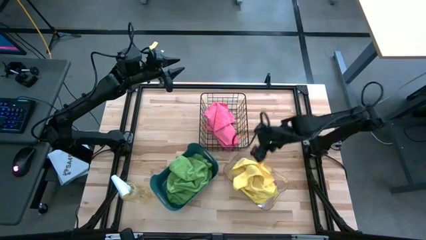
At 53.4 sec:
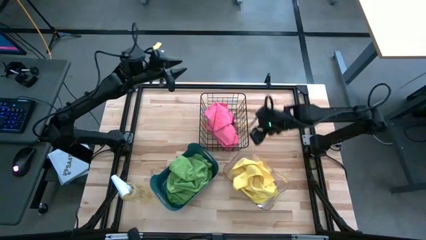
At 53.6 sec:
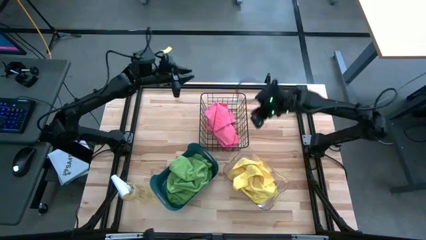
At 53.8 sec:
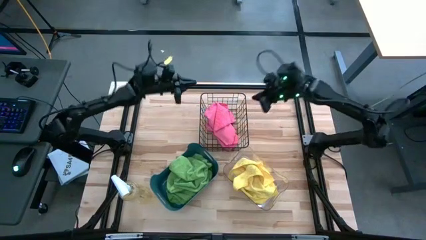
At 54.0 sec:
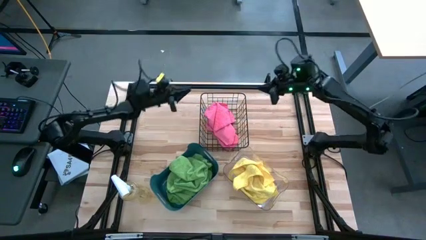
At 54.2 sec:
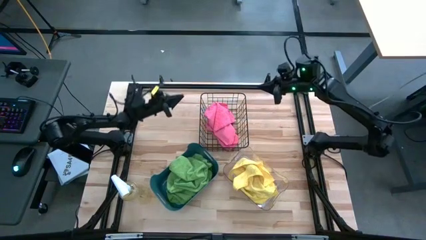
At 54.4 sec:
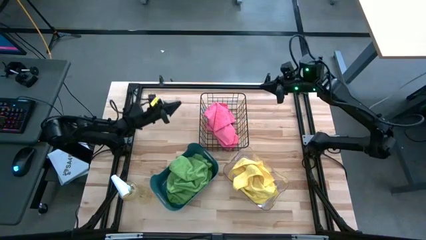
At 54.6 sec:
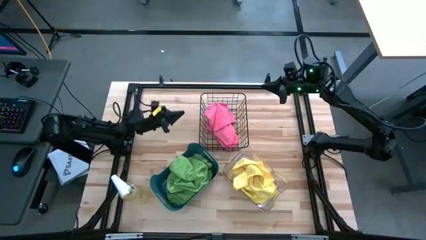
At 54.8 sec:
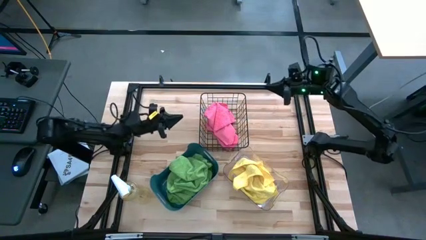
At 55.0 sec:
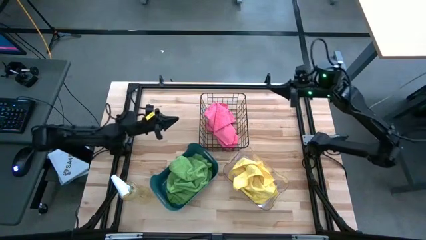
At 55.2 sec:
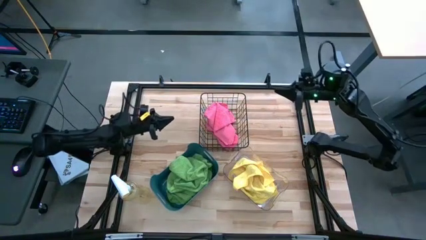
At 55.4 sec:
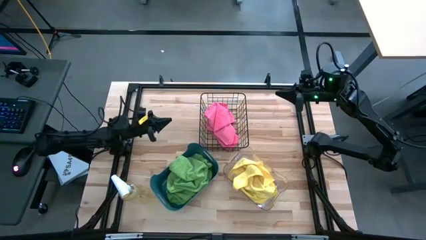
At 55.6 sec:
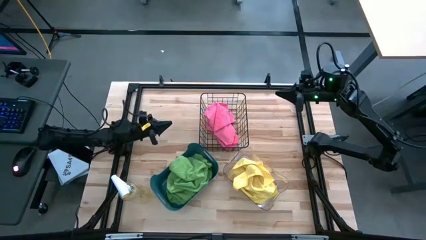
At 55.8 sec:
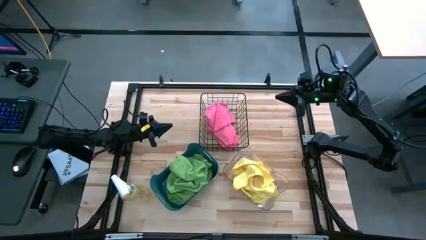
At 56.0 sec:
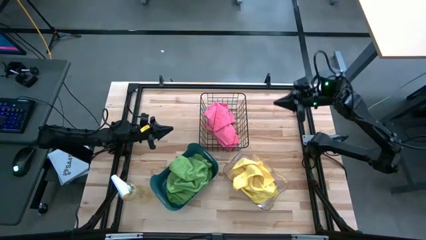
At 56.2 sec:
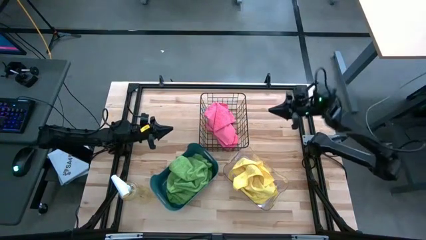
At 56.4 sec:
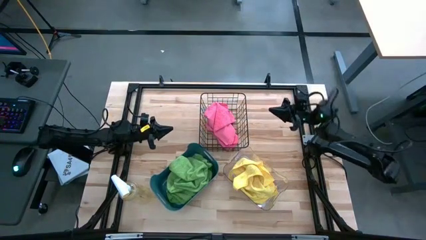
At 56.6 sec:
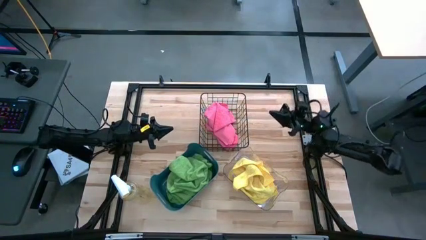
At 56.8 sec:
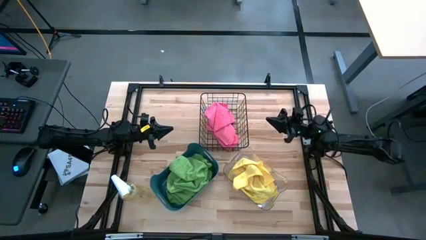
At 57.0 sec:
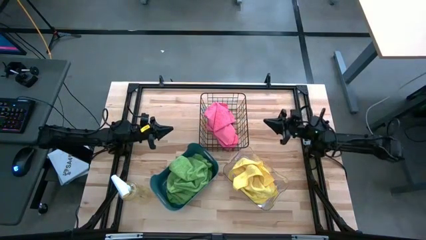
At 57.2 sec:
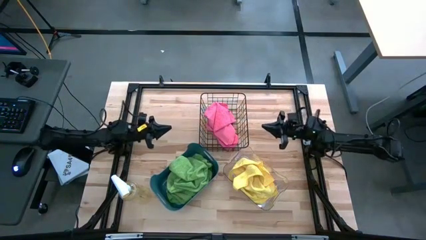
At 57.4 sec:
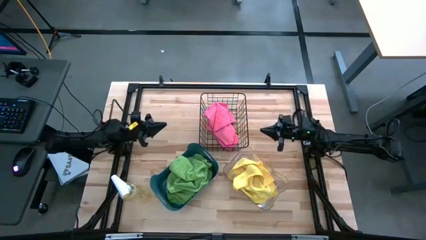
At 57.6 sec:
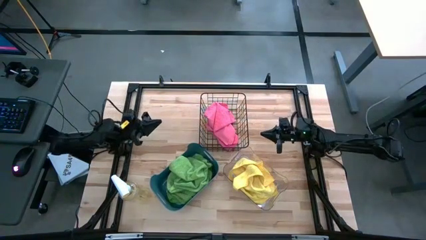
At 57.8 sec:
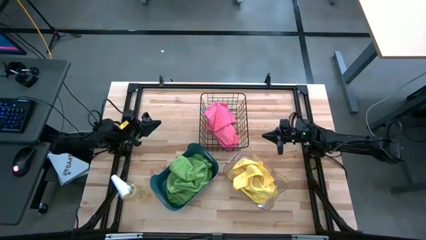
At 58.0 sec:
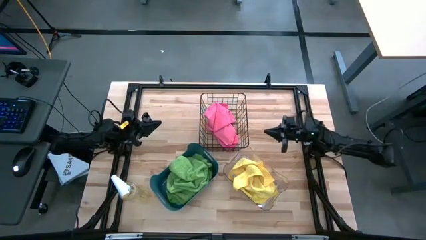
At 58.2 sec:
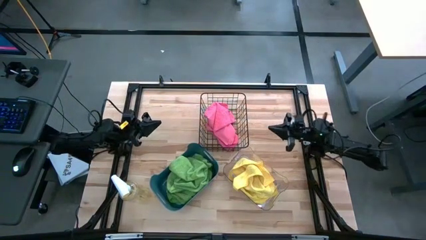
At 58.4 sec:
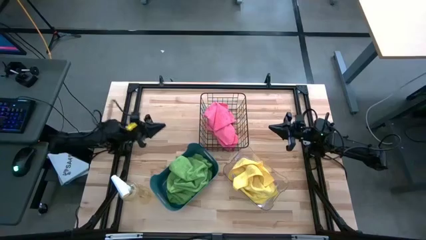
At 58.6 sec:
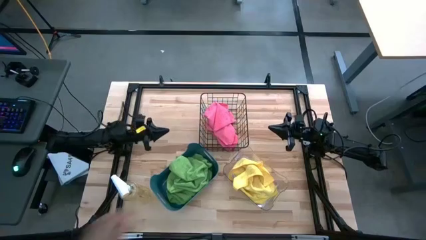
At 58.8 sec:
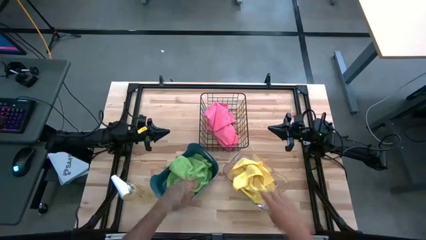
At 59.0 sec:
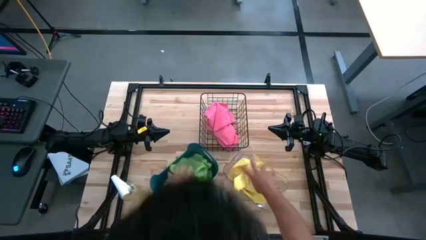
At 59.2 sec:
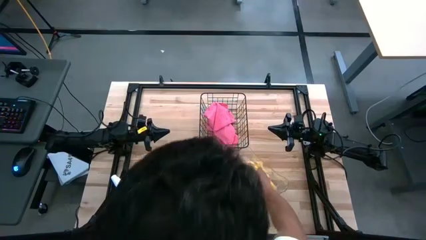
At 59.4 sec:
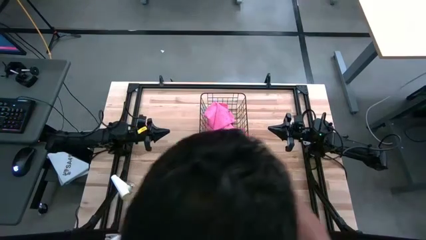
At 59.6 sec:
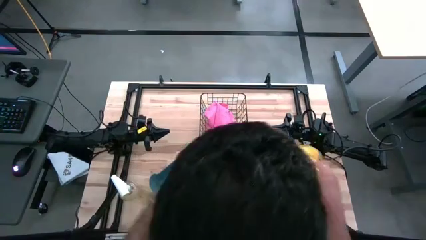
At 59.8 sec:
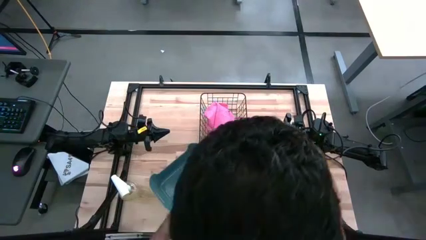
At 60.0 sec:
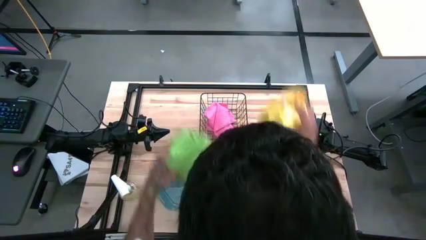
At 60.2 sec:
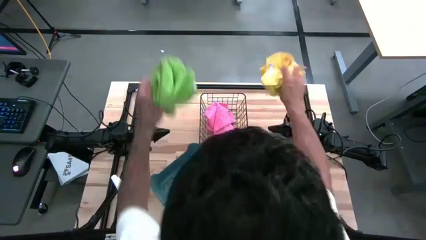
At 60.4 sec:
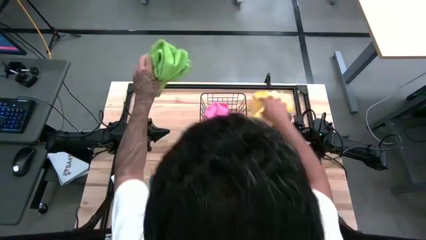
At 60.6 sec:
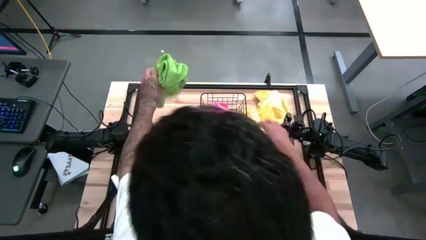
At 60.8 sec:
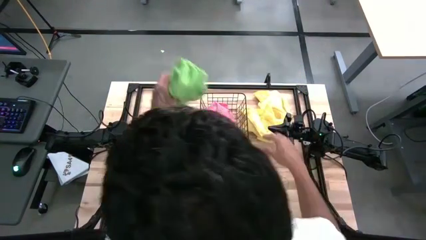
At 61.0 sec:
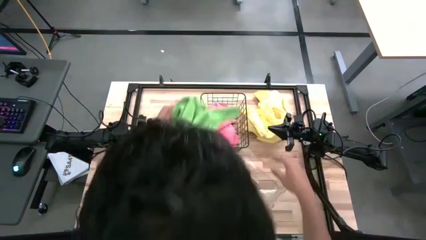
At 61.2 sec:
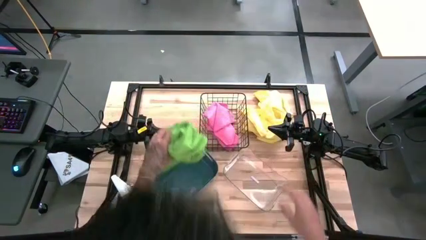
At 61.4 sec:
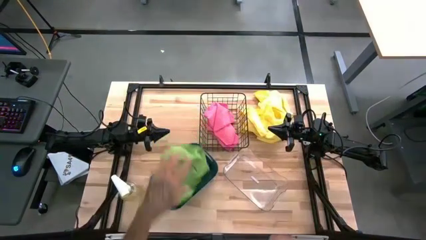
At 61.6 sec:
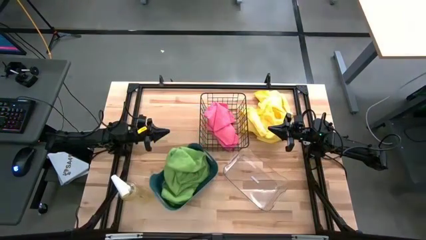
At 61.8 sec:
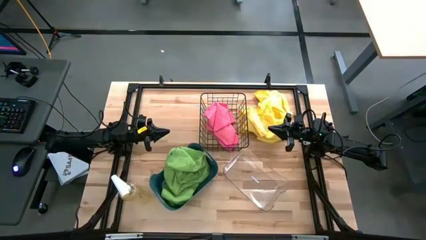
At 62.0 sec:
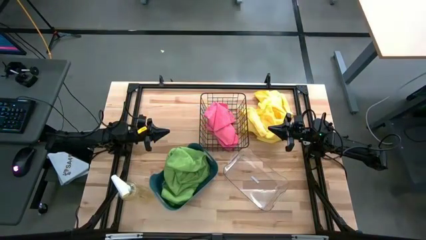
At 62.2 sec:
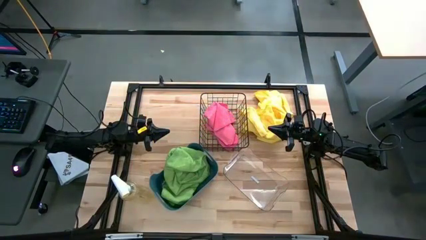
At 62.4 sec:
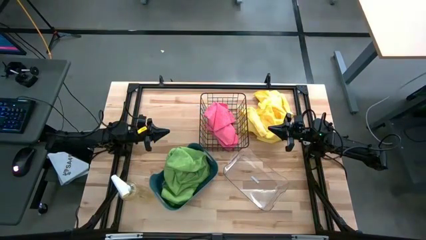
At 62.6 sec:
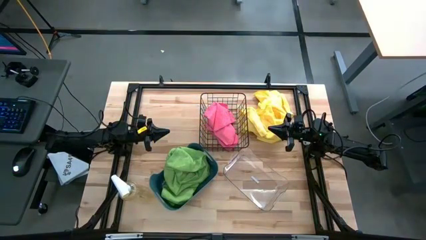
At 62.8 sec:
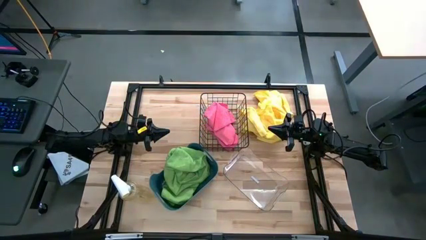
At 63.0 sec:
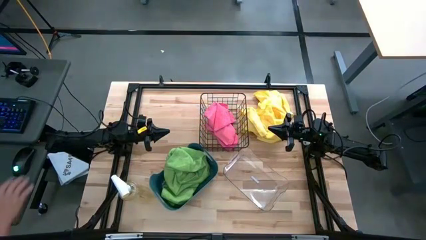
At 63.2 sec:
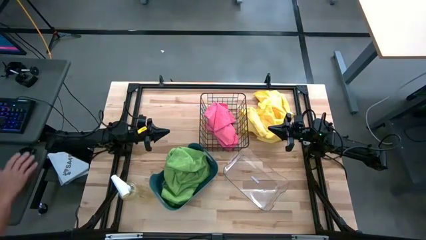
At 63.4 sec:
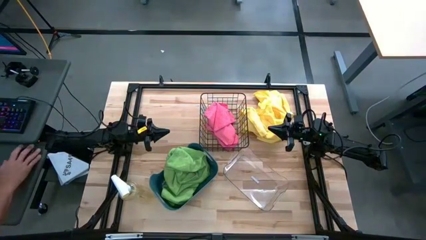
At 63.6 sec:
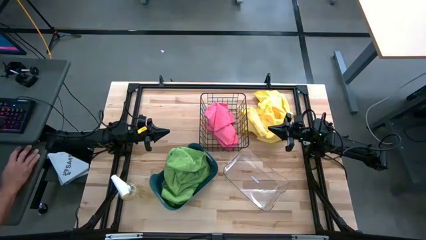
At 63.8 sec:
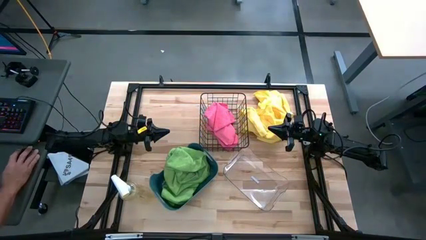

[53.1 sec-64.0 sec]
Task: Sort microfiber towel by color & place in baskets
Return to Home Position
